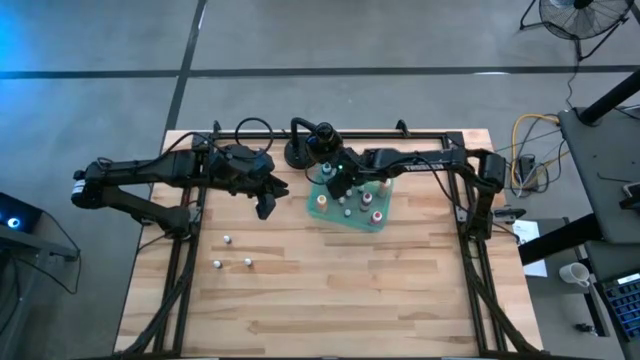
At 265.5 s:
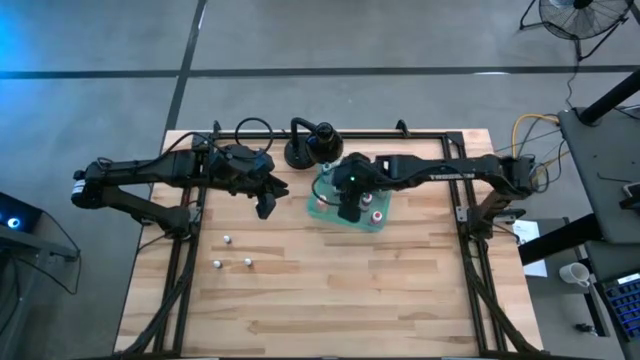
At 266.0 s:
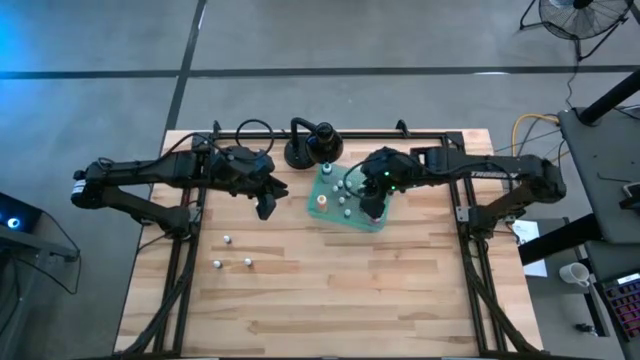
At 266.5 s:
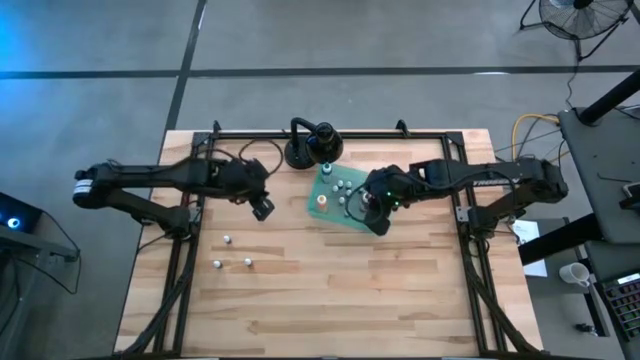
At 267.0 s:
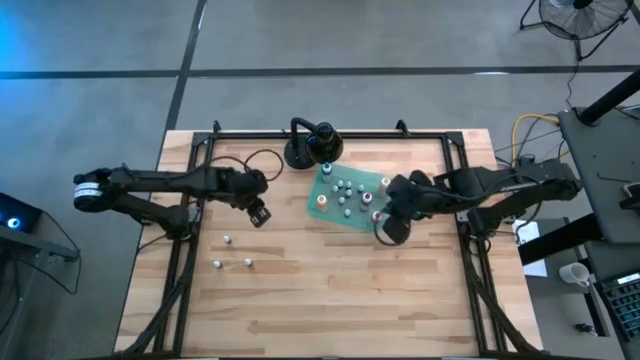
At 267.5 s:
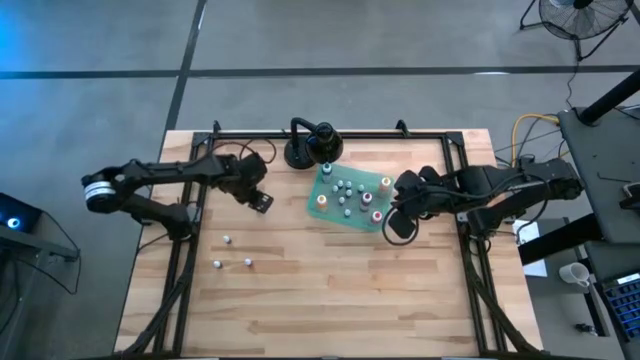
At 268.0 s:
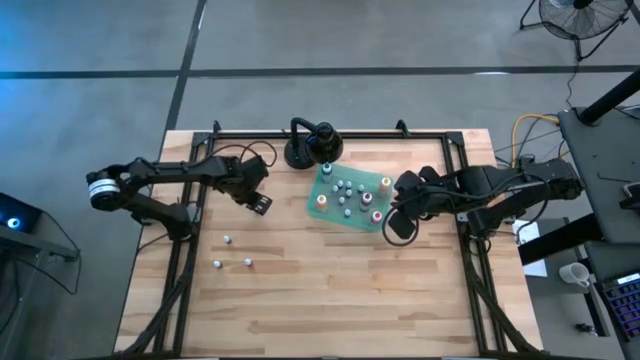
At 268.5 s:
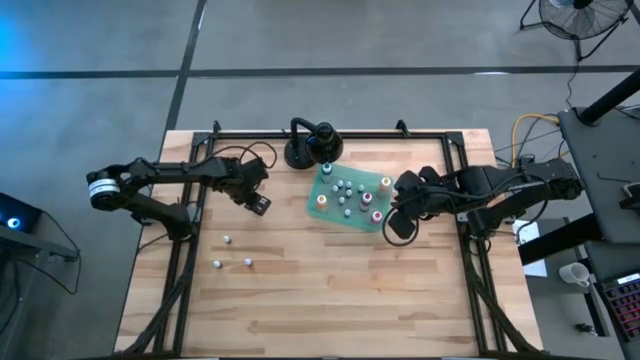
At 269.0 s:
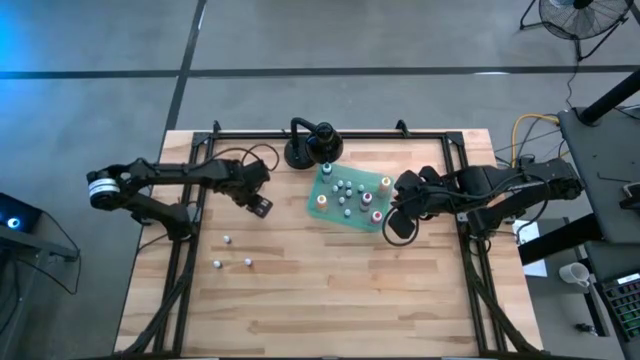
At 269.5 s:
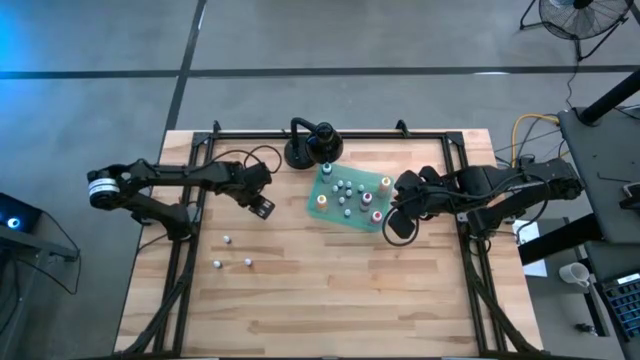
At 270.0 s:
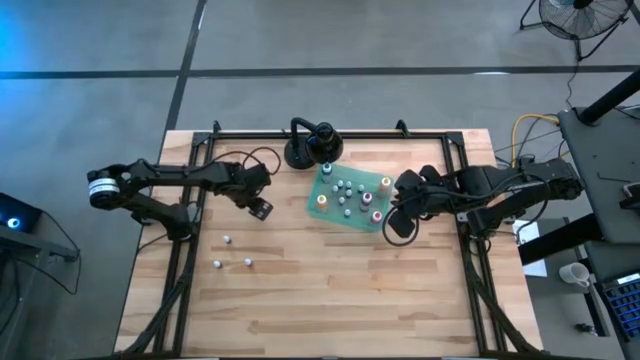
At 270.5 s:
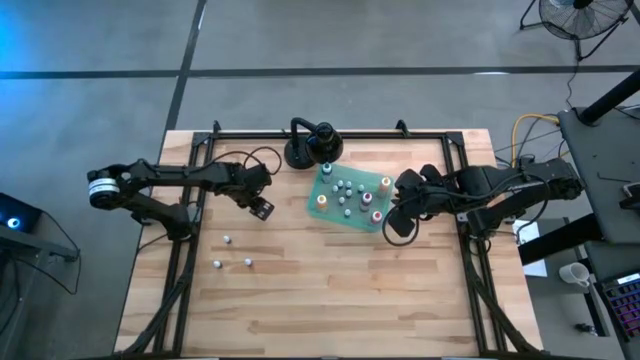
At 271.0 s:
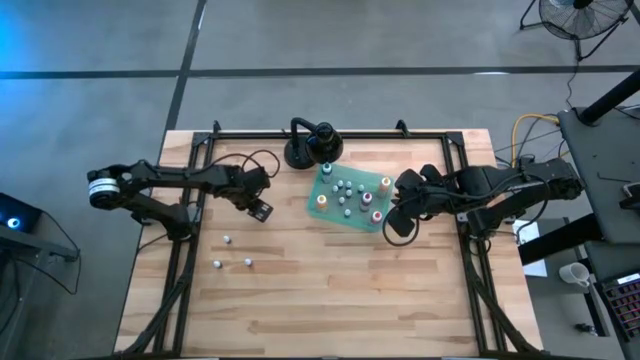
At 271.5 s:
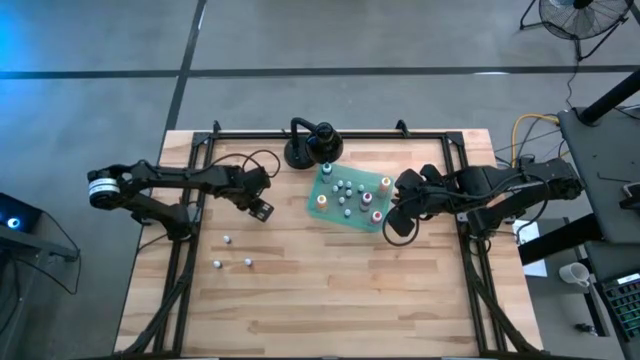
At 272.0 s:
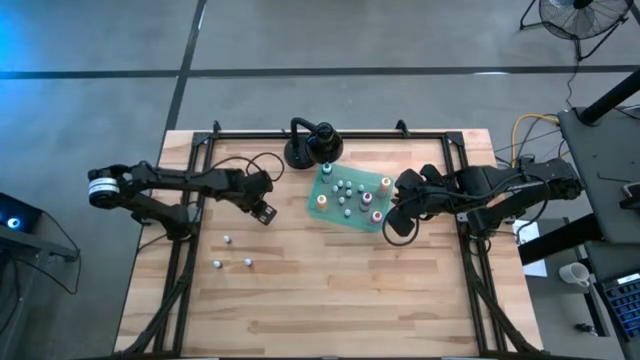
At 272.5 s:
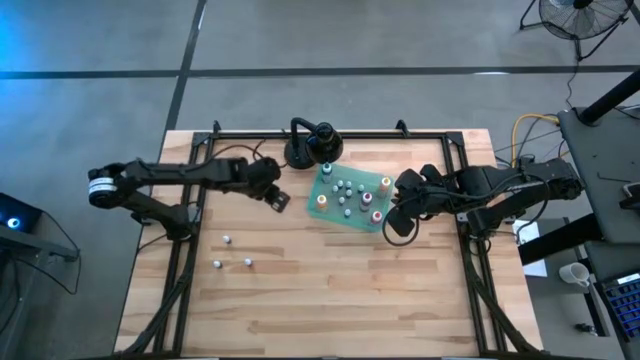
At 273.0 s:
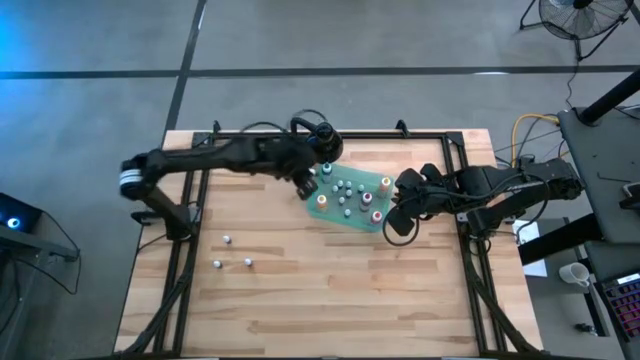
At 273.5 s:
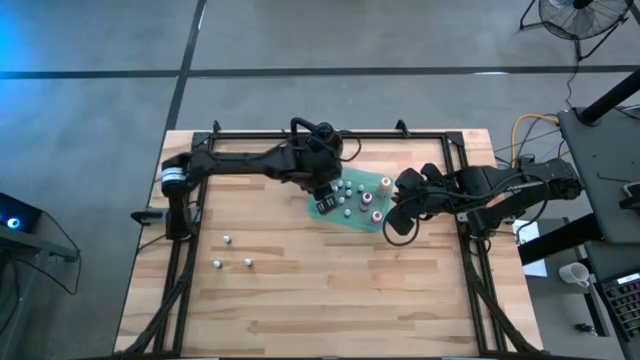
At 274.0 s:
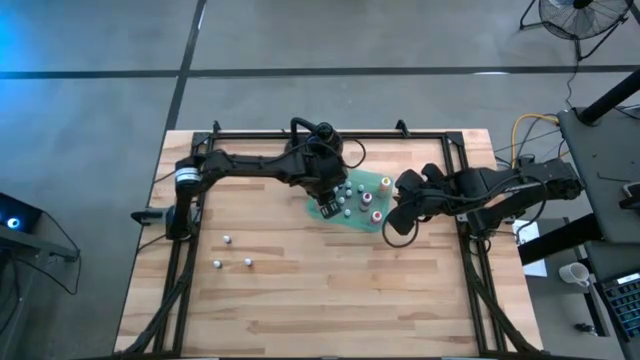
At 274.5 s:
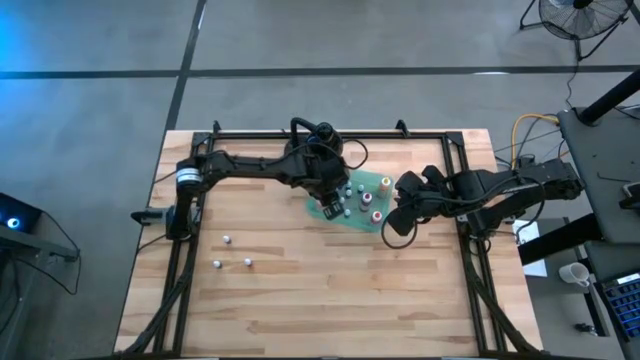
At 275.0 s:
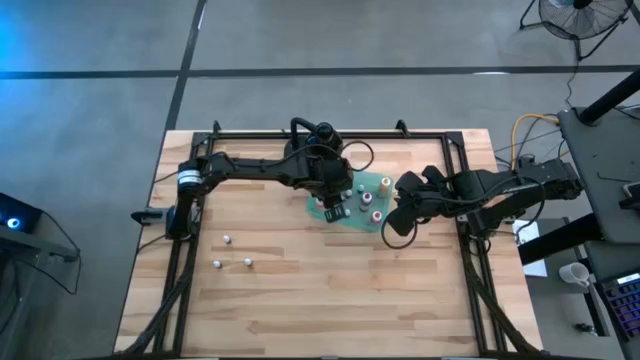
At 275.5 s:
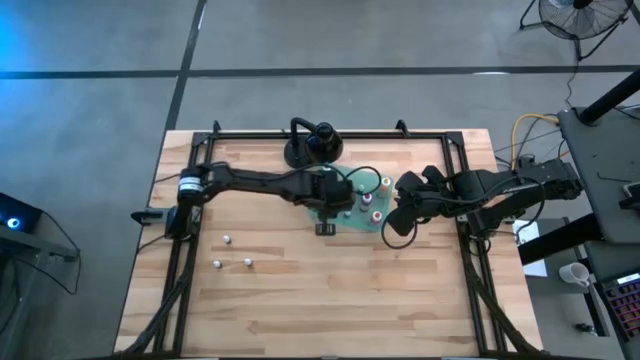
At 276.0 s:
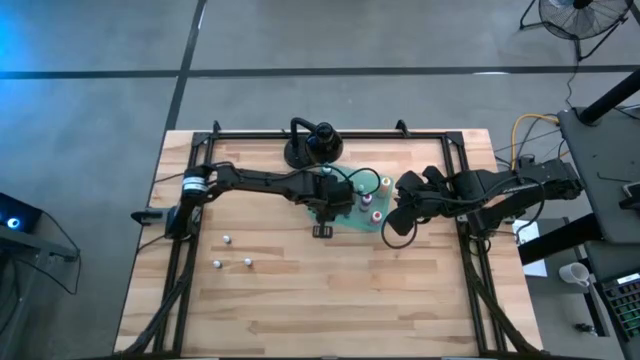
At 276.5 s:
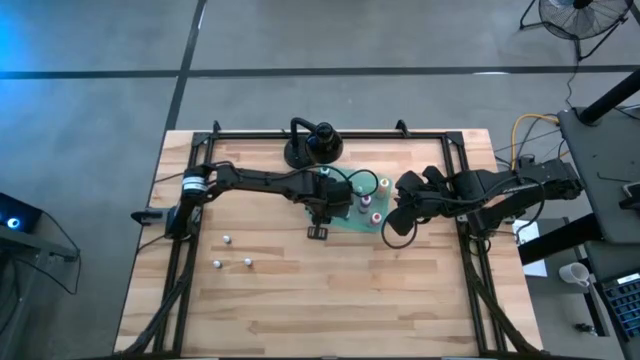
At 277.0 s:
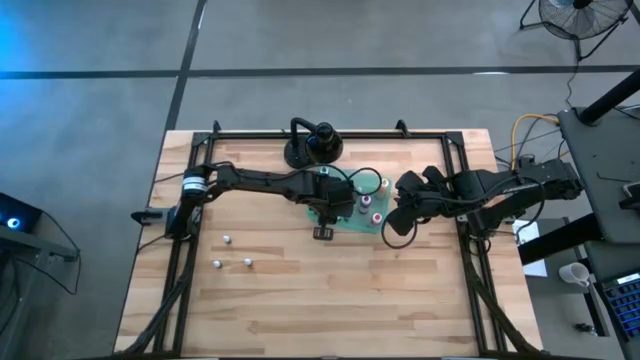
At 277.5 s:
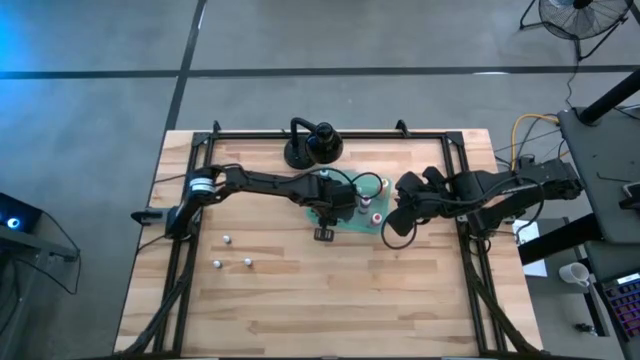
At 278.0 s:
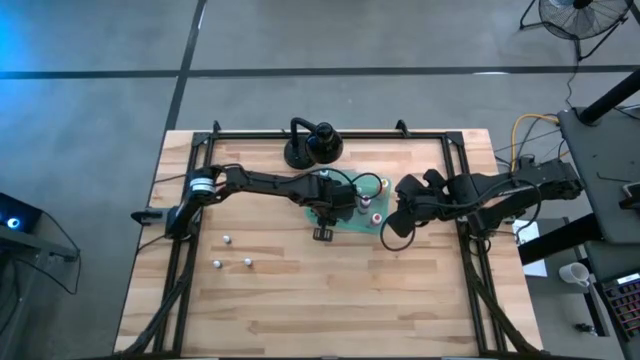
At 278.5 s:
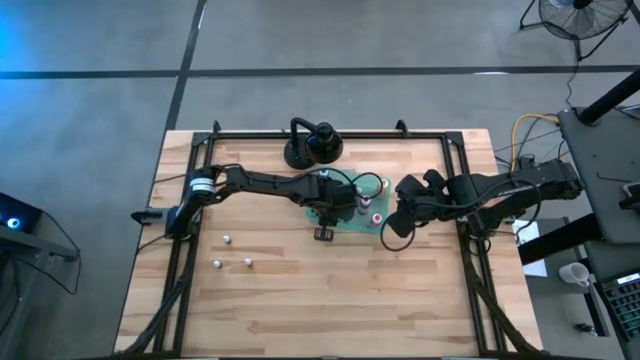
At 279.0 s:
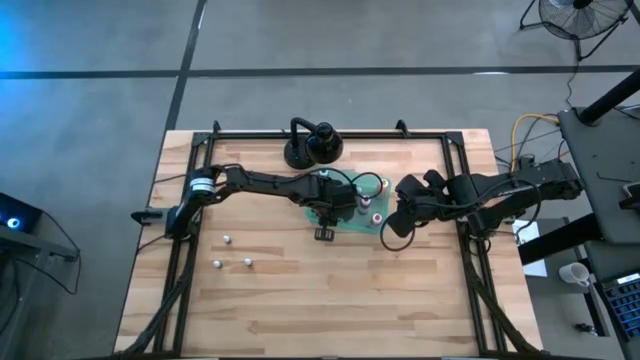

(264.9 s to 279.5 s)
Task: Pick & Place food coloring
Put the violet food coloring bottle into the bin

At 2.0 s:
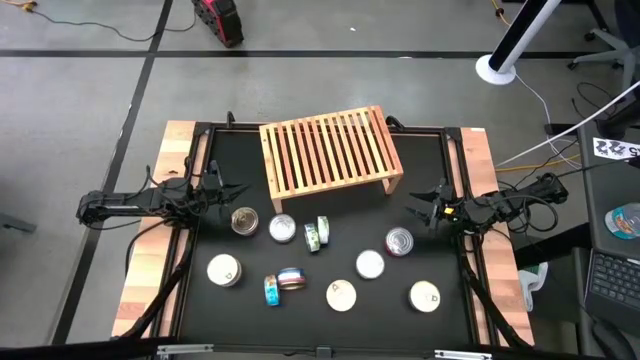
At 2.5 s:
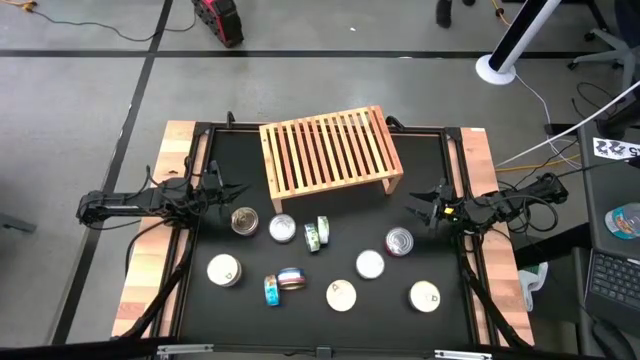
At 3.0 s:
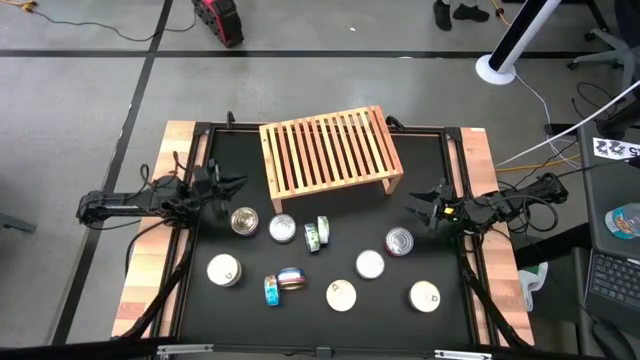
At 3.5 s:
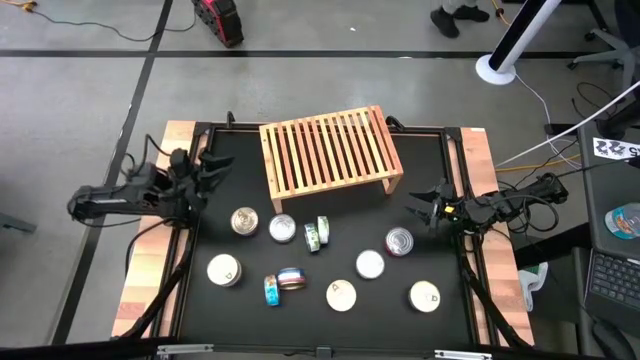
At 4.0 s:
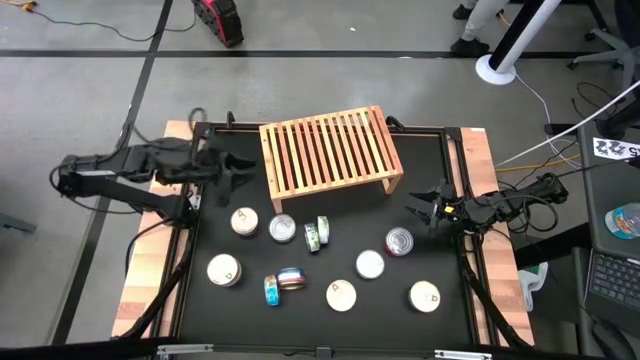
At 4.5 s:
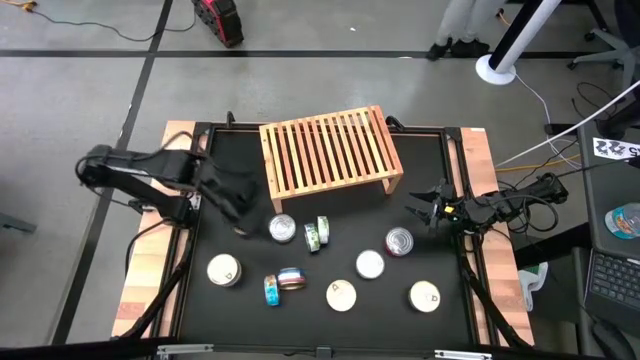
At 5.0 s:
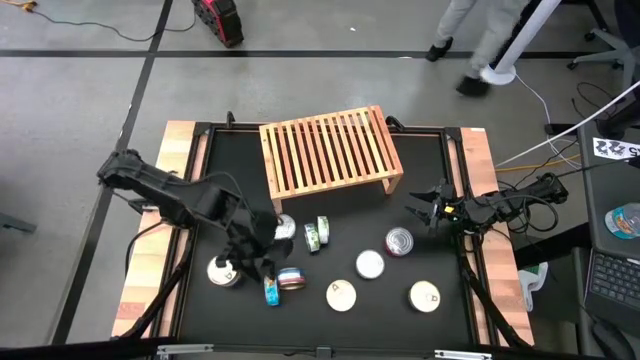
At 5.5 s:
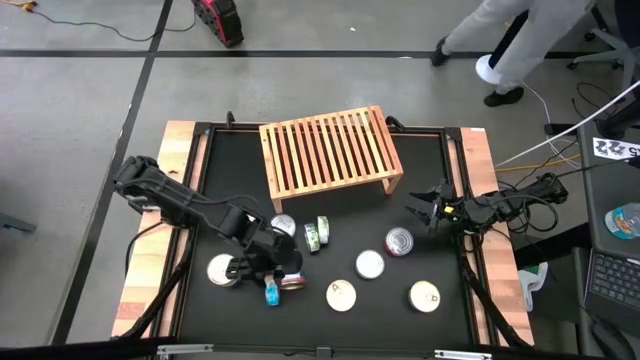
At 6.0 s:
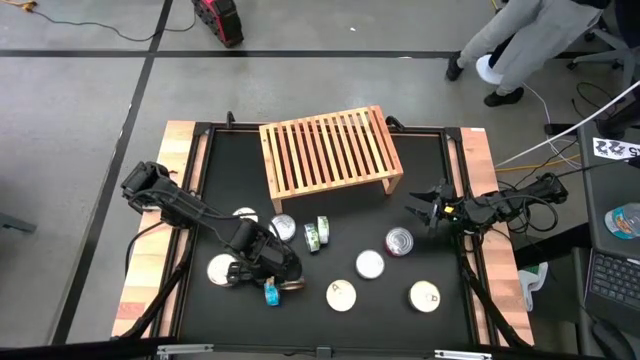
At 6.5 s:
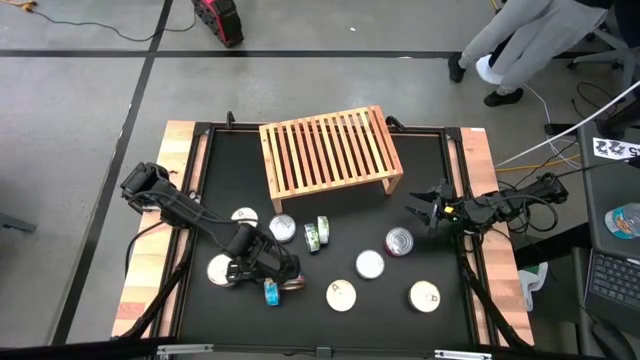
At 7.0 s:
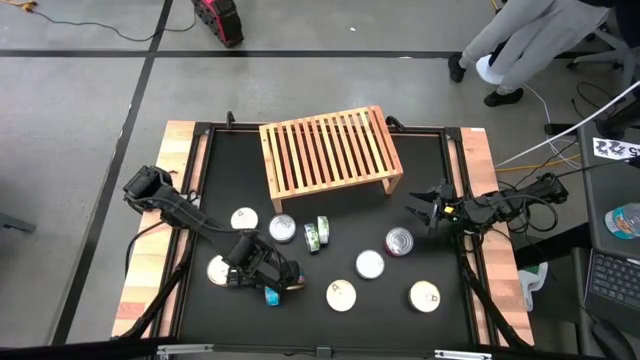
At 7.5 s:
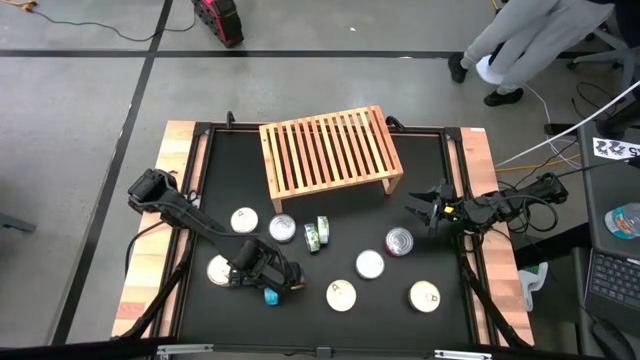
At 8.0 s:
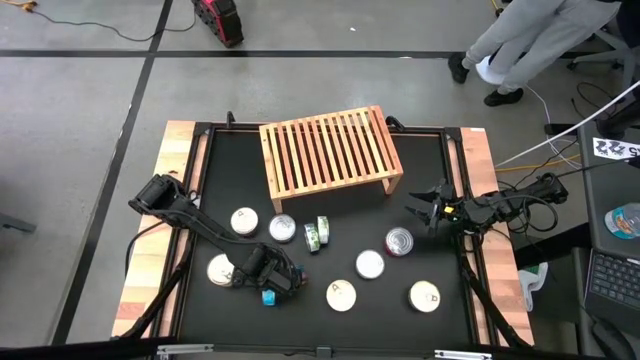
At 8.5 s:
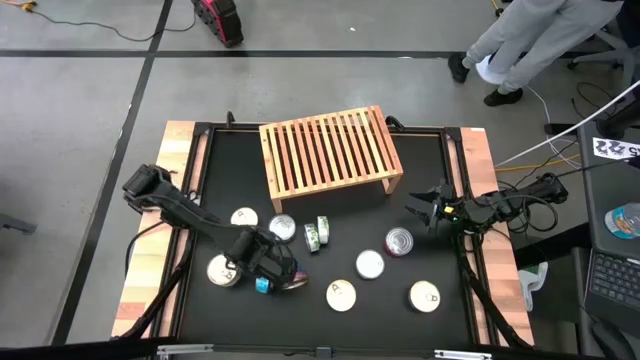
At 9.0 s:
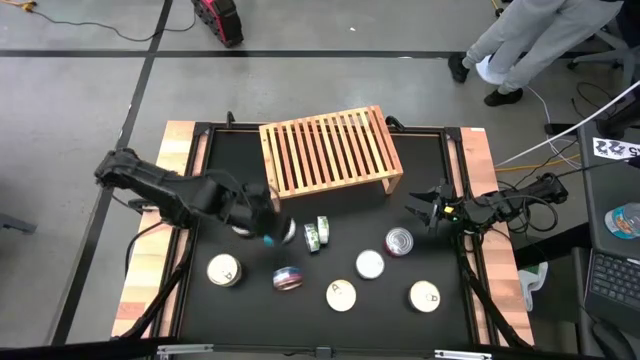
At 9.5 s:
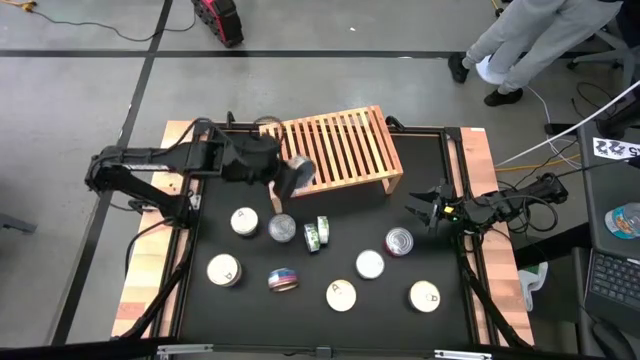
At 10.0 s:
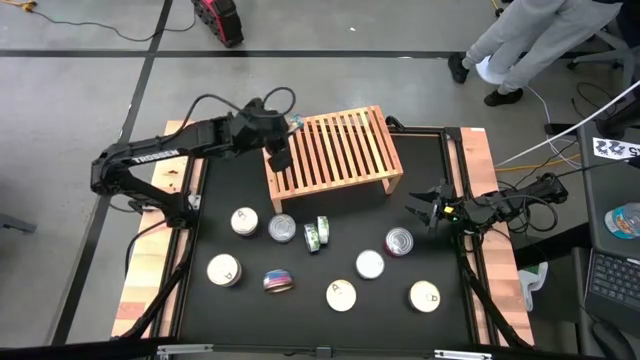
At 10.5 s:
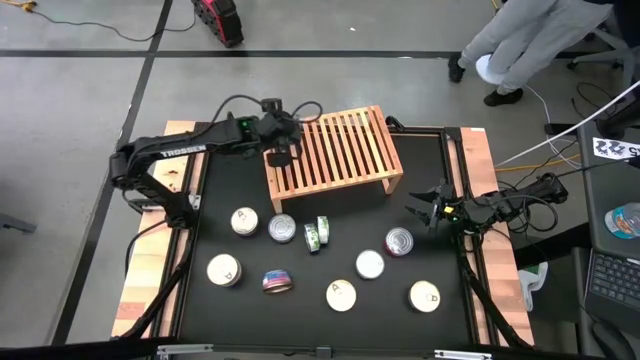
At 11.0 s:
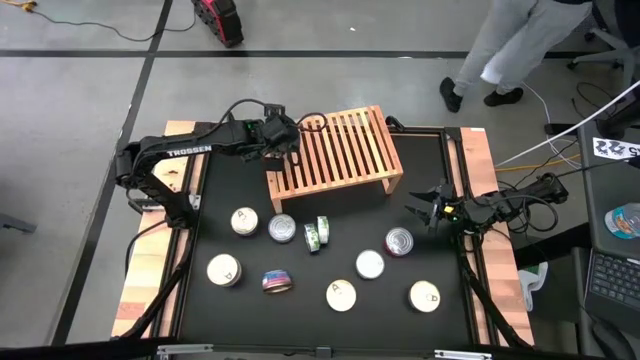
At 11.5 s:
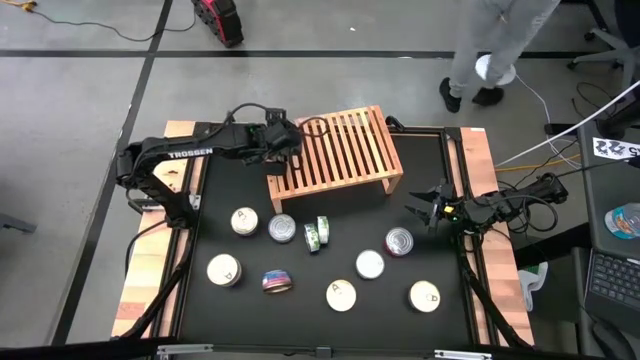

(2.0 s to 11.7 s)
Task: Stack canned seafood by type on shelf
Put the yellow tuna can on the shelf
